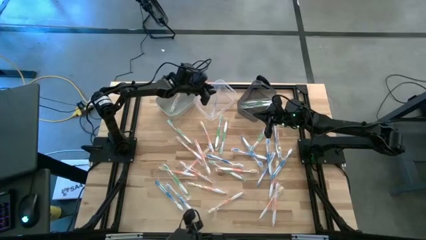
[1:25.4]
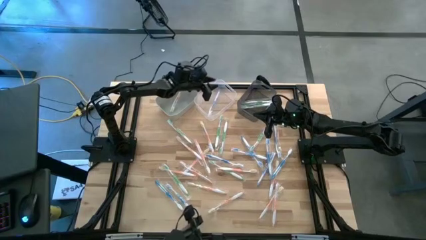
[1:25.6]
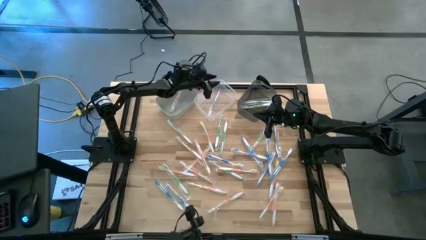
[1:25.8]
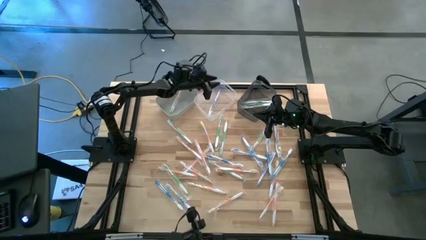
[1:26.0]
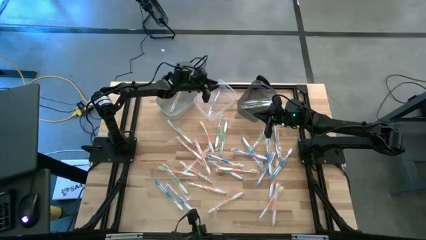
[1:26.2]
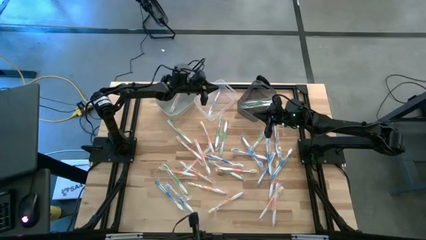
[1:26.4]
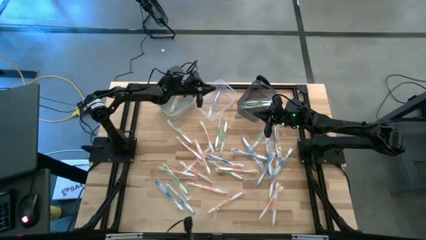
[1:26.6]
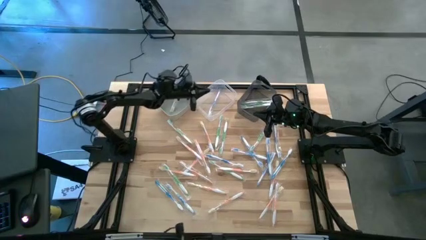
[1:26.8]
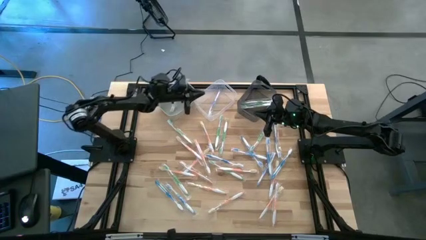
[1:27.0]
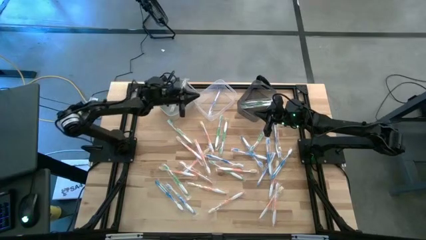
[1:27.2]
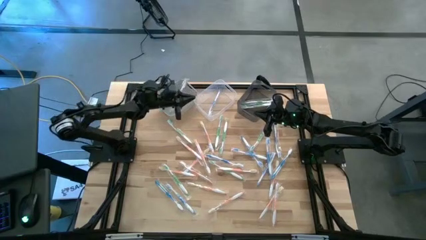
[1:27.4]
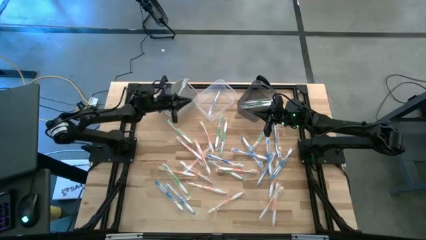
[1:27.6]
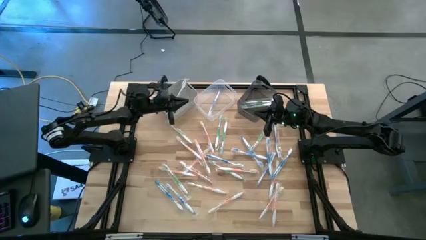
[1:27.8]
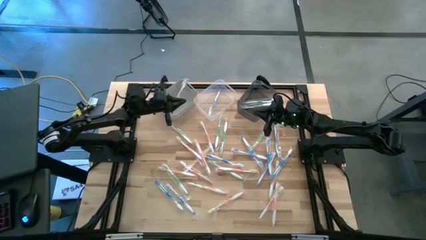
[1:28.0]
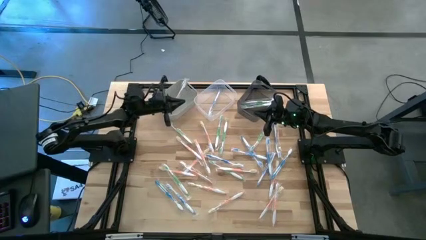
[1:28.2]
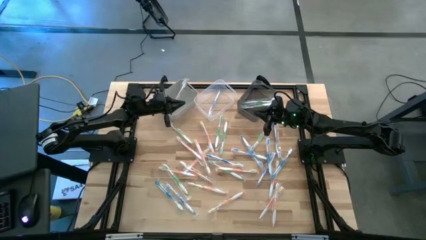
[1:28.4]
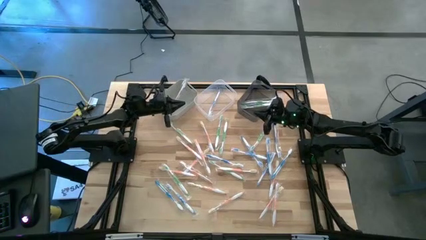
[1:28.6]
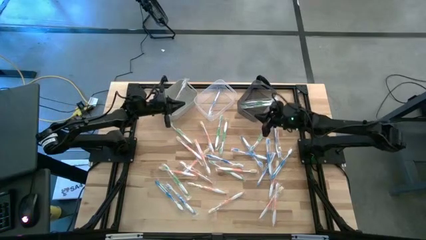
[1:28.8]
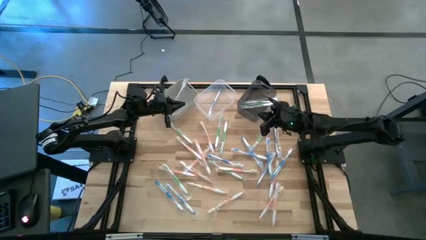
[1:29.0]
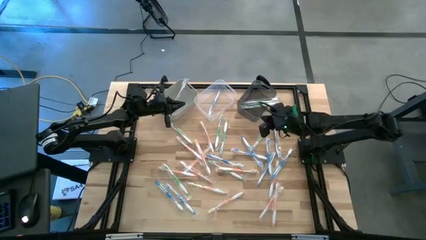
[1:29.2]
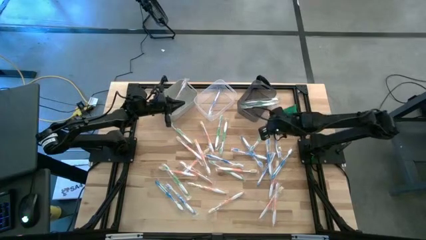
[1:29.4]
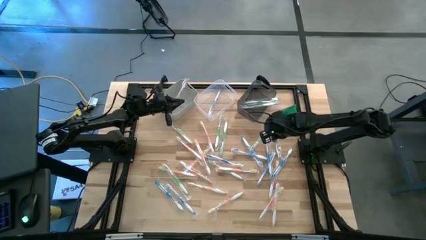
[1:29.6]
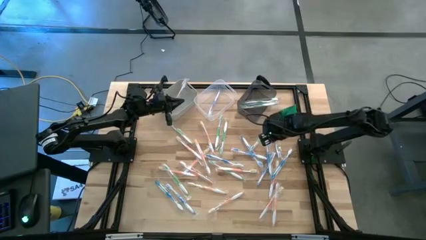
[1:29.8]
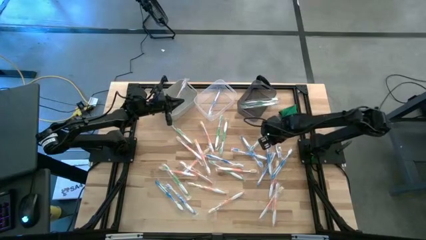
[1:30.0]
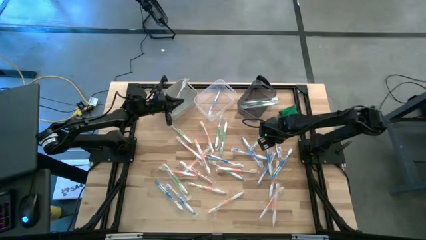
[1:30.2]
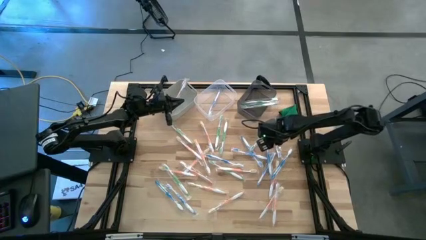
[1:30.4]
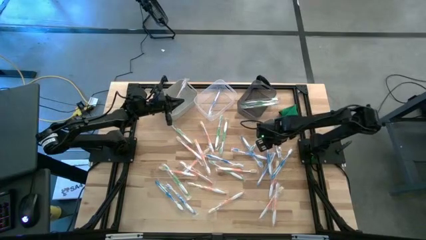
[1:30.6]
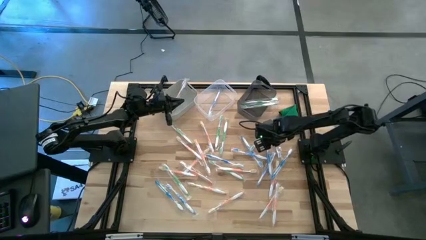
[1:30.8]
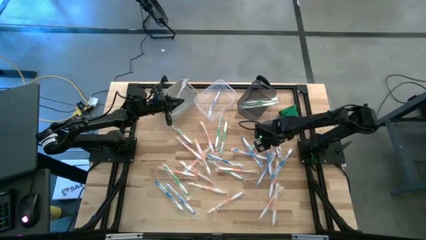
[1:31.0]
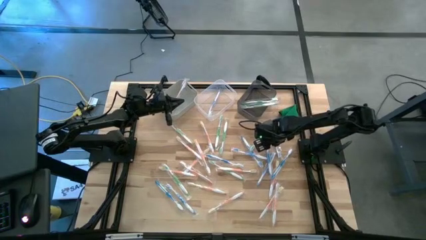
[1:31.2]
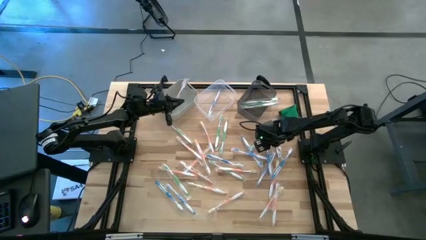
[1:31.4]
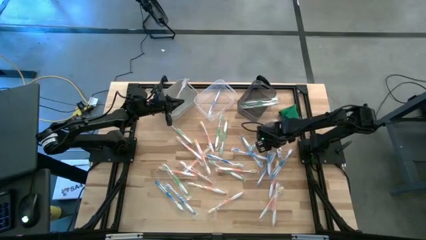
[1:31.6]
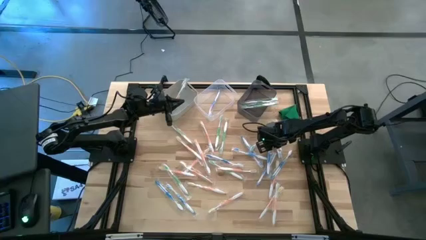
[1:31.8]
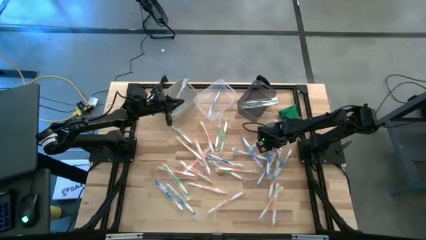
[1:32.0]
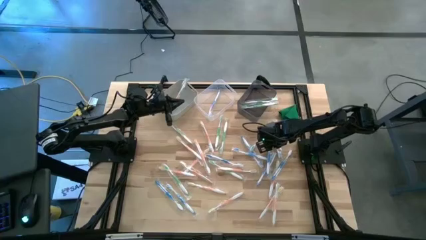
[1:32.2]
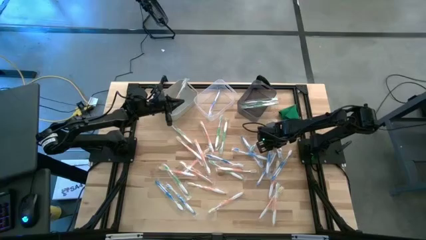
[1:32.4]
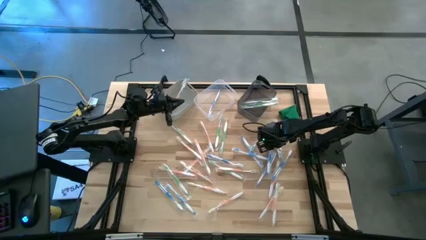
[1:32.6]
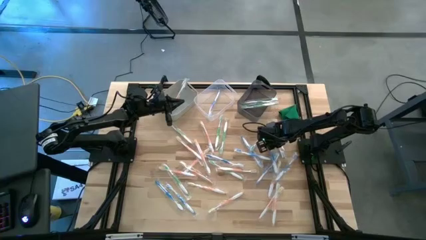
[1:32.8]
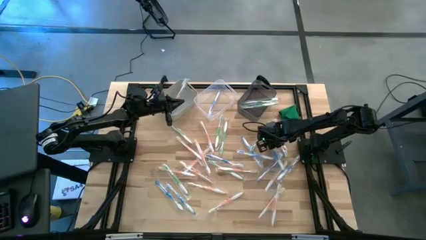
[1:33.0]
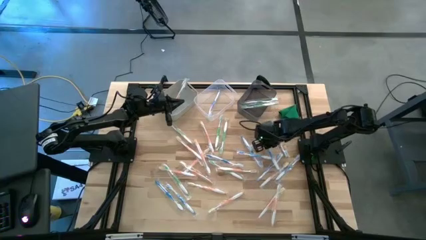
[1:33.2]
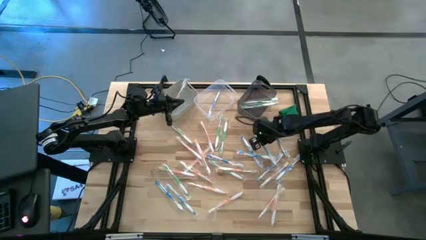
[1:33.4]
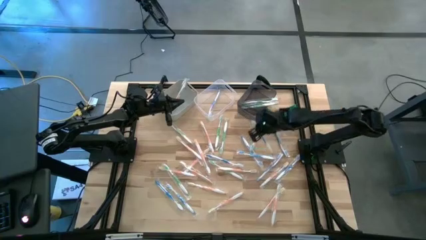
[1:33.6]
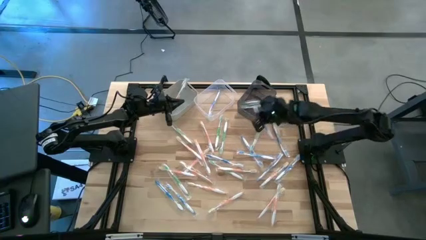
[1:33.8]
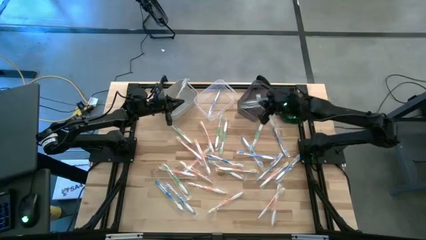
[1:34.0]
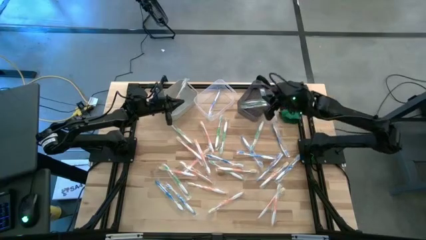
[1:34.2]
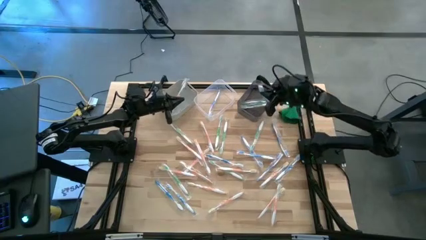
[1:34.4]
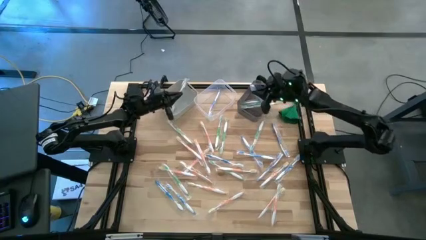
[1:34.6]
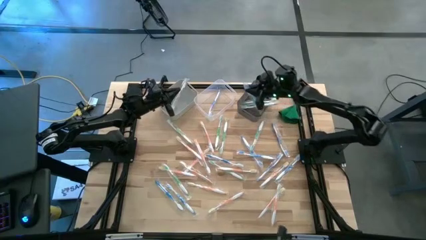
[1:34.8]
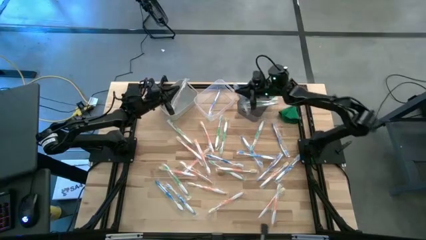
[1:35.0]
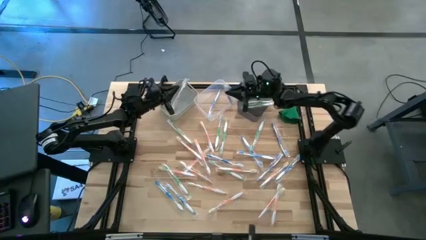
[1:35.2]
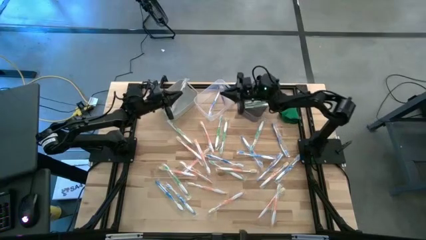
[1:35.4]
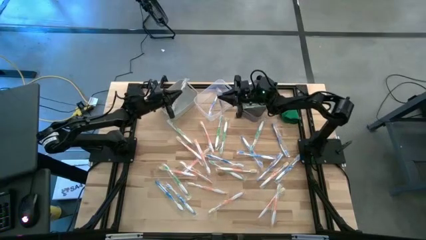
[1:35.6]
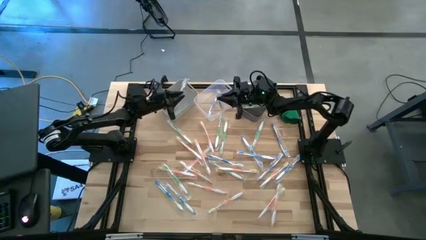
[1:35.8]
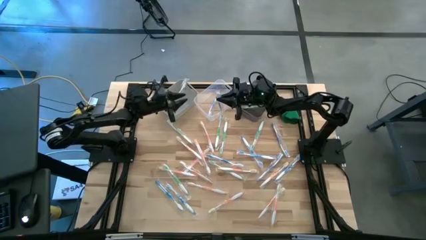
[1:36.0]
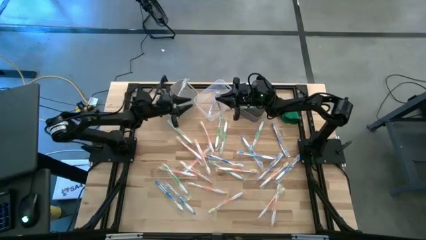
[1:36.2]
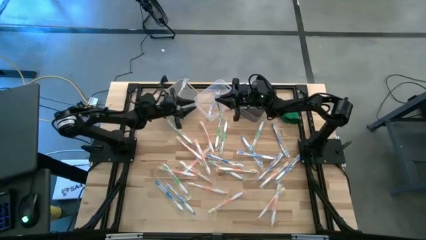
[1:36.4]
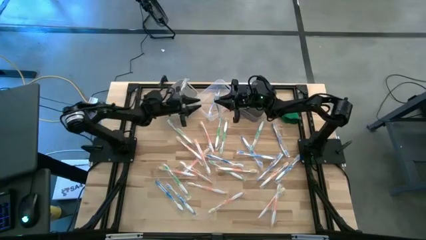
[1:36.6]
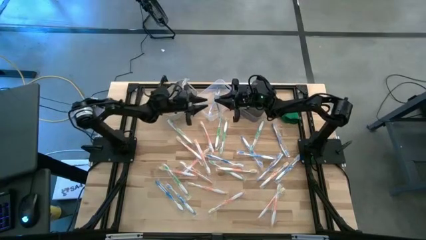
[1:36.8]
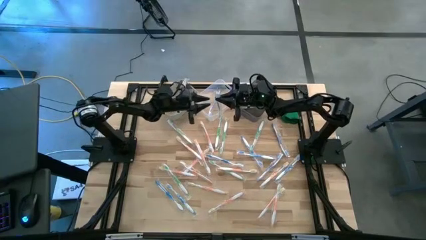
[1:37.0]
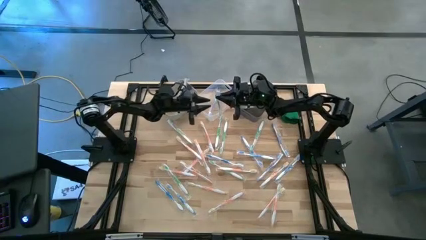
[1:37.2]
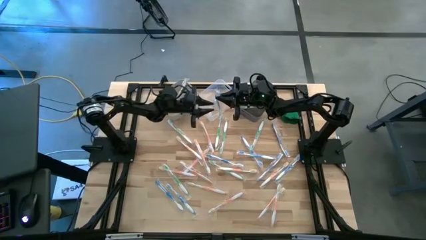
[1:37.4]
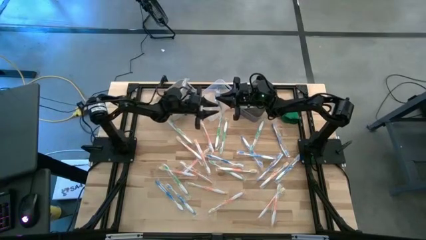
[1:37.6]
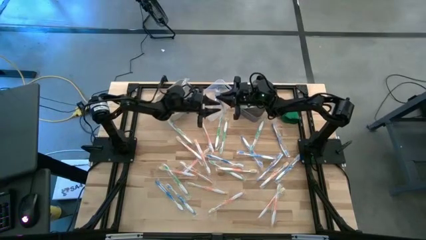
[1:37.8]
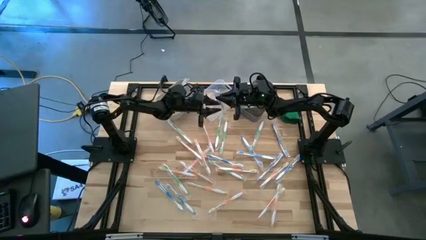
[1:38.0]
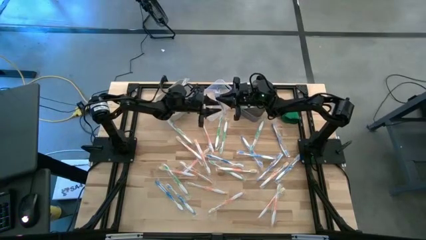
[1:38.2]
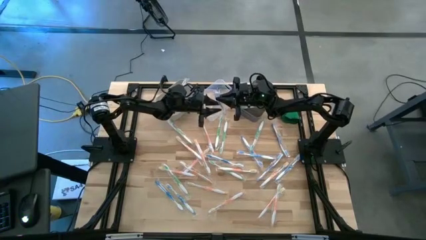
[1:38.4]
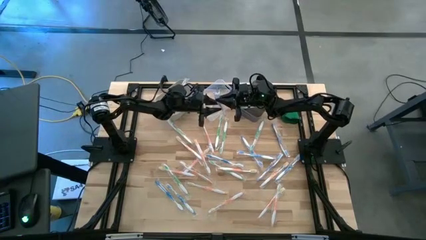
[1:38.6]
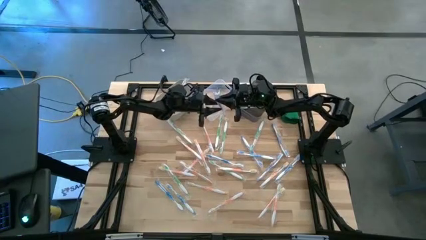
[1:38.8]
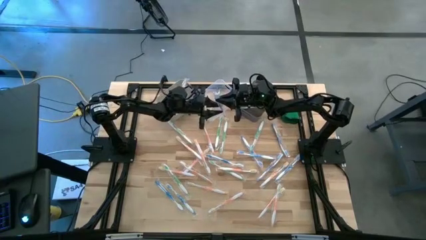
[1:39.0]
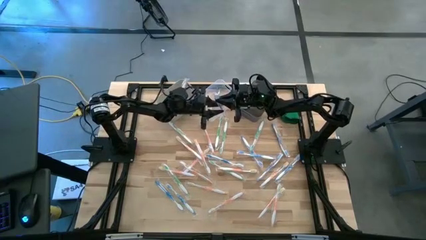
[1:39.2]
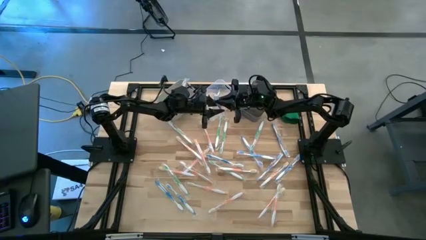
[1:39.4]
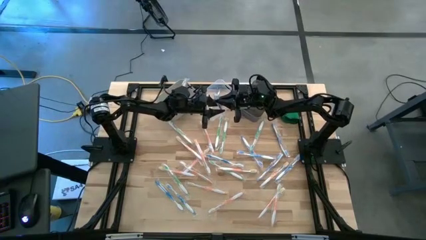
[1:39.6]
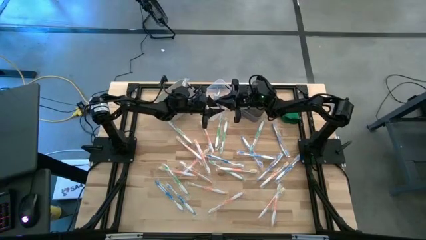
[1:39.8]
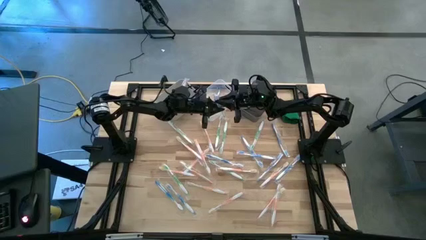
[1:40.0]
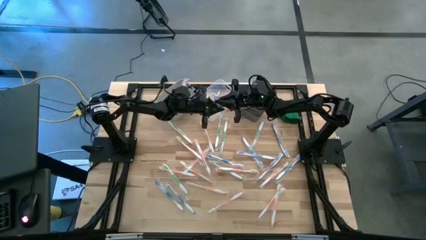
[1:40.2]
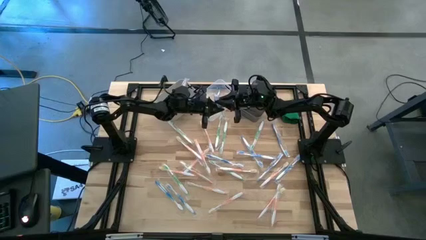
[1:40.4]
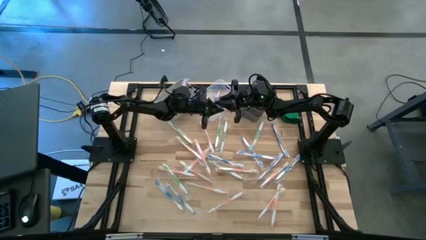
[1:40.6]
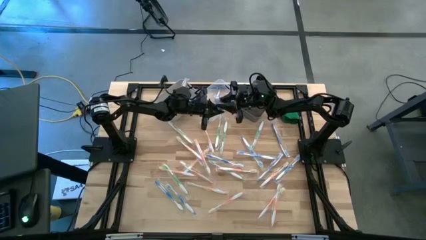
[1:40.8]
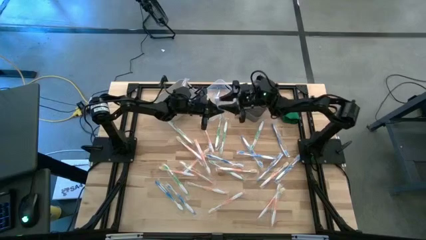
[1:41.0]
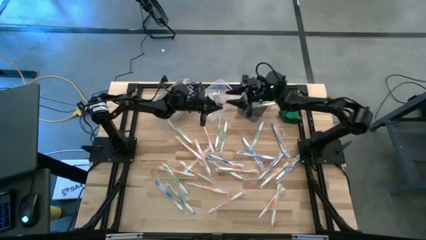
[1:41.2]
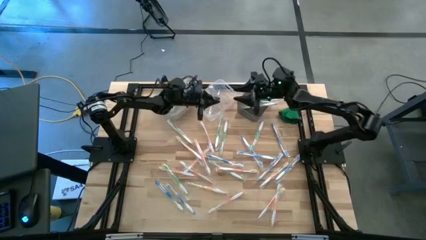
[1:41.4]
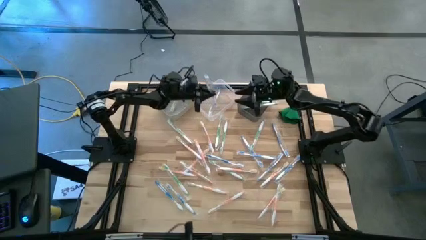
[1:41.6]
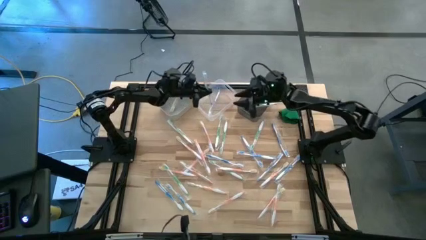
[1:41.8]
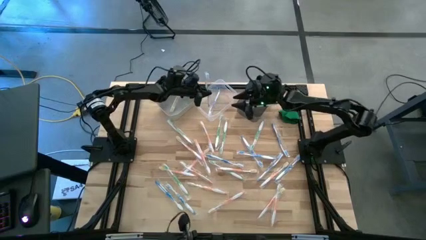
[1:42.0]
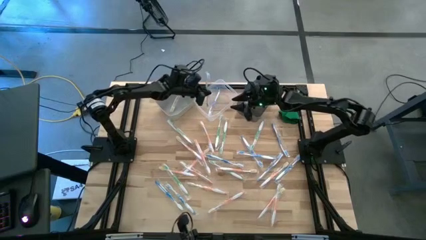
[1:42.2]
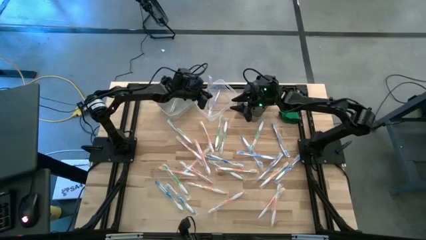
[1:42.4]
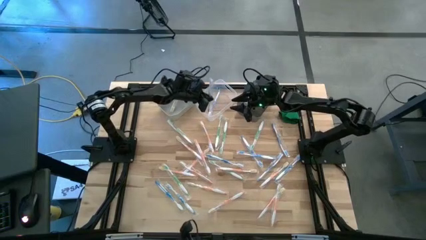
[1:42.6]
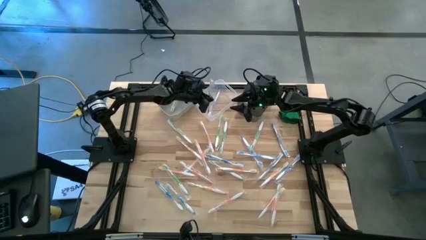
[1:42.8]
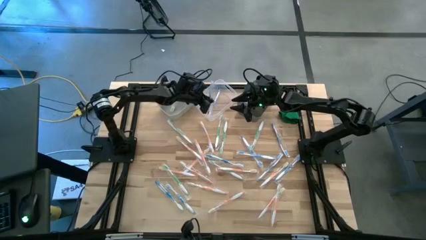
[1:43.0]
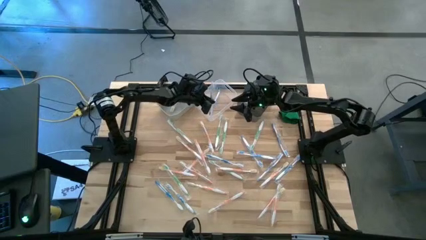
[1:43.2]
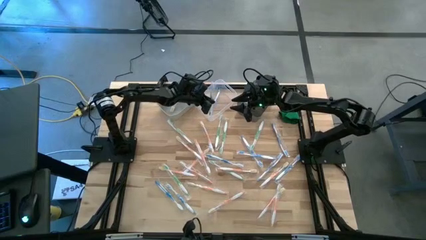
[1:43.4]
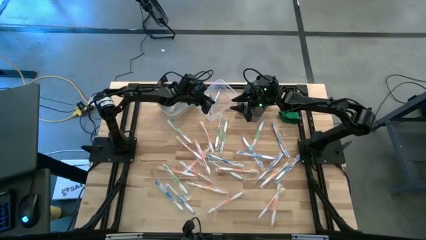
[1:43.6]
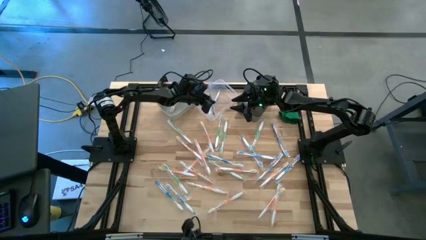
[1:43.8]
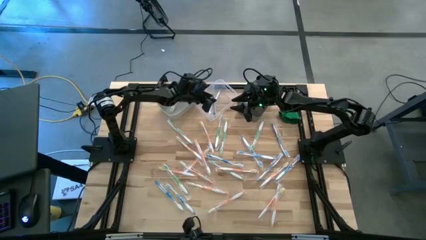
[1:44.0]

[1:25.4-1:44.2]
Task: Pick & Place Toothbrushes
Put the blue toothbrush into the transparent bin
